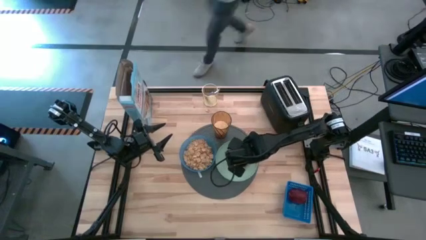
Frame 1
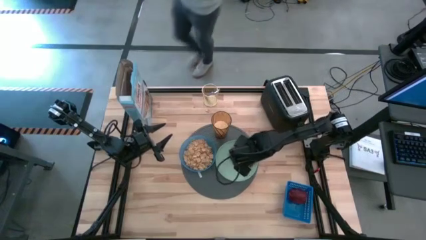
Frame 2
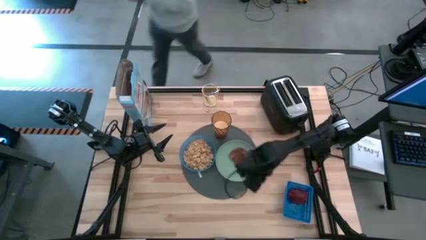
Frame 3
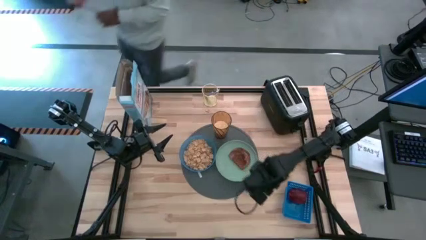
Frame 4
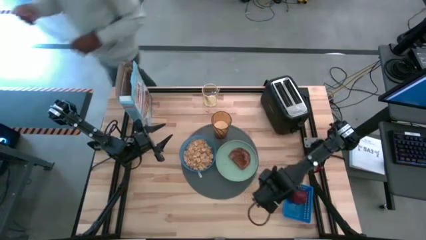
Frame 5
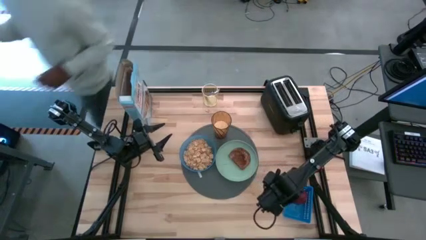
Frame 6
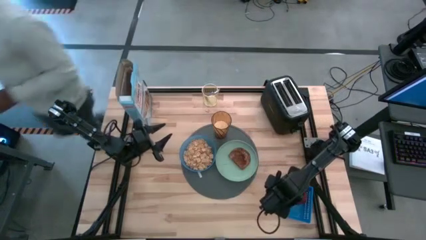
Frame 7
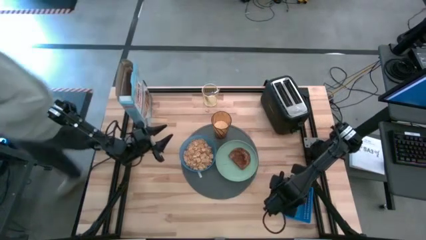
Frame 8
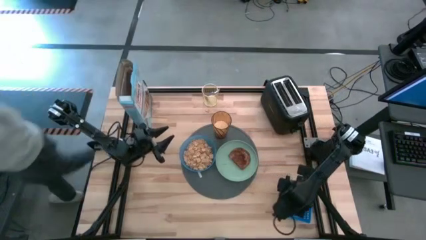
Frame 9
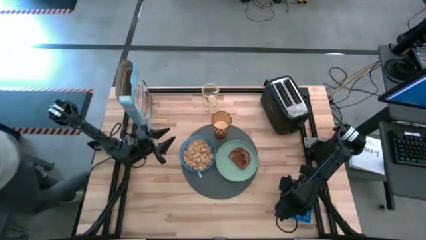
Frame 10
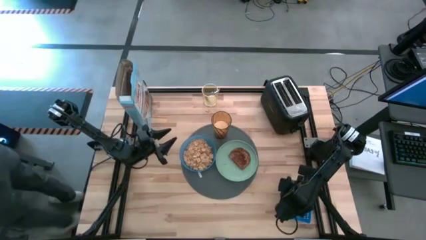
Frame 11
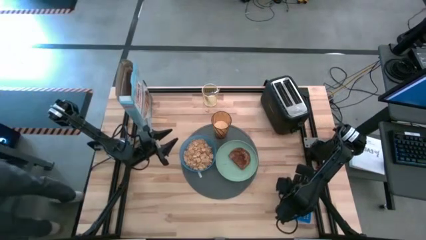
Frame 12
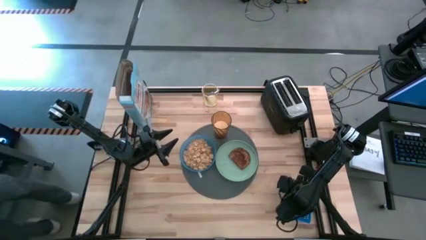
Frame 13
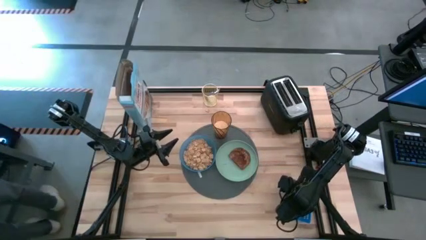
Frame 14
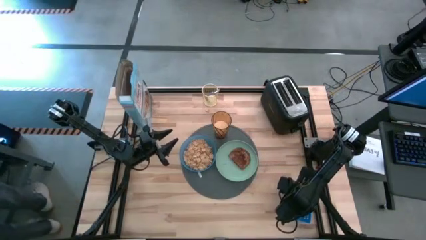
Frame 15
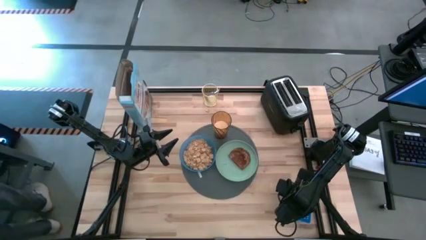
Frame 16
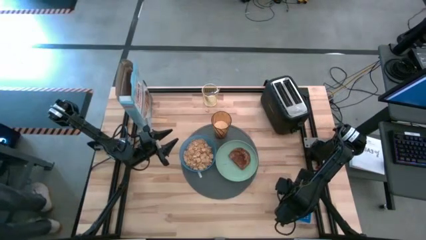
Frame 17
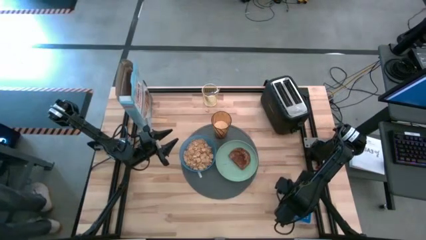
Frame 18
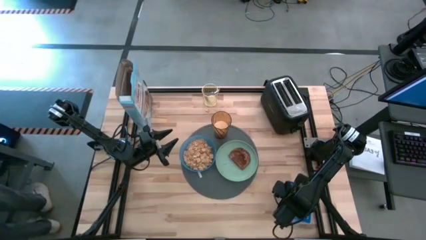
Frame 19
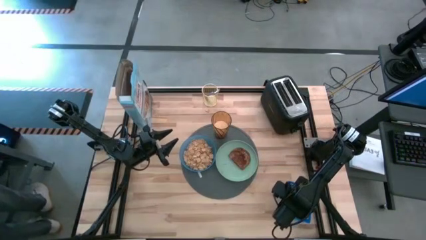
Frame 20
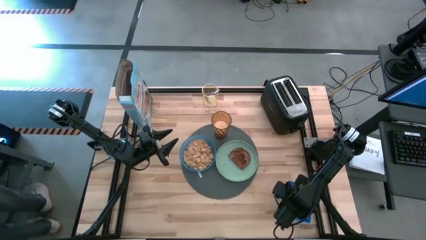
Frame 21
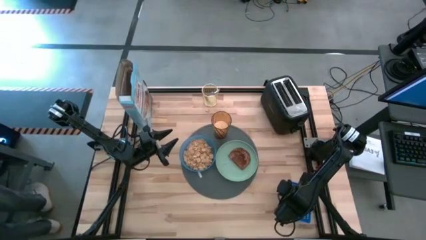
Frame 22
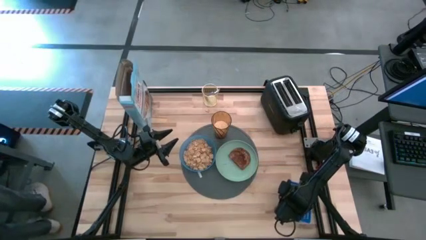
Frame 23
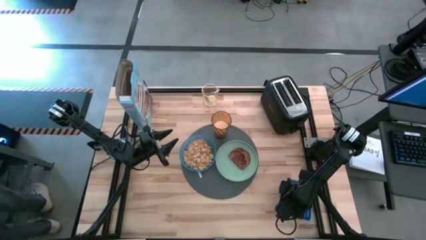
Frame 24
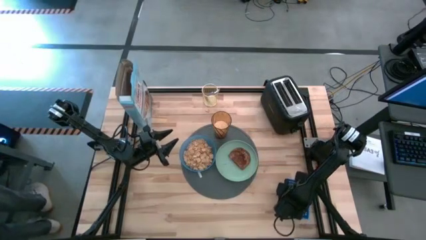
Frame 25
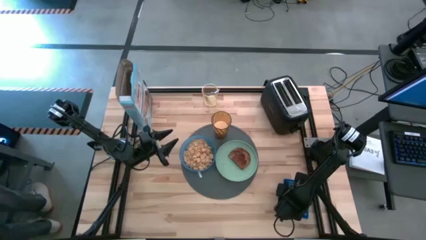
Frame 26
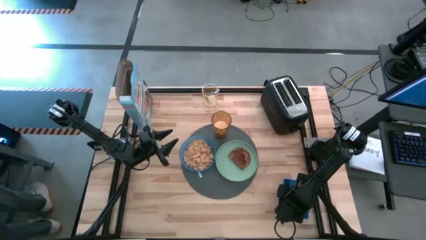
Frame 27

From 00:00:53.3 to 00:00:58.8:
Task: Arrange a breakfast setting
Put the apple on the green plate

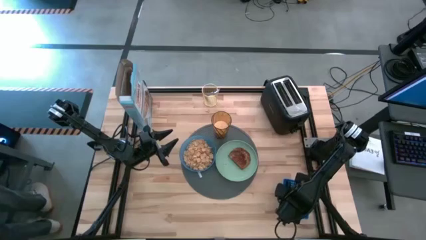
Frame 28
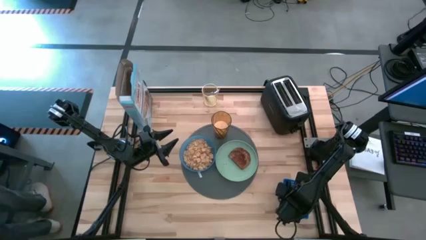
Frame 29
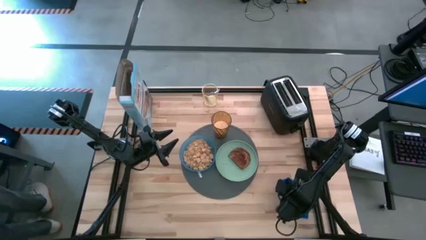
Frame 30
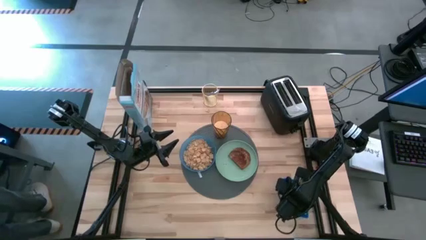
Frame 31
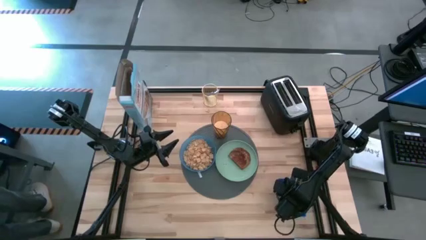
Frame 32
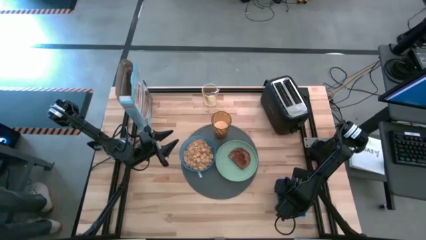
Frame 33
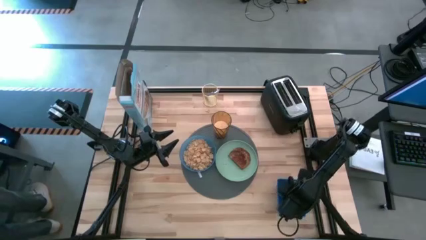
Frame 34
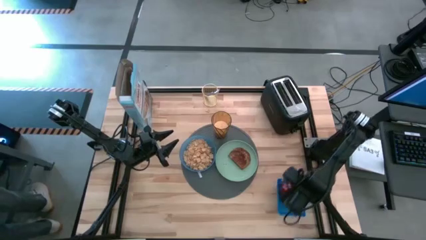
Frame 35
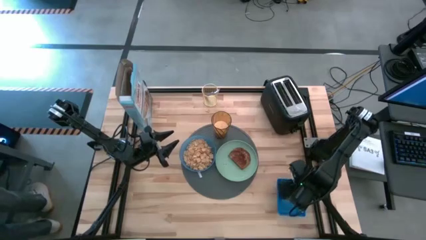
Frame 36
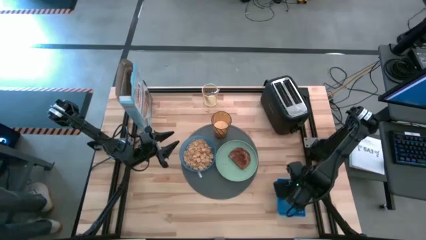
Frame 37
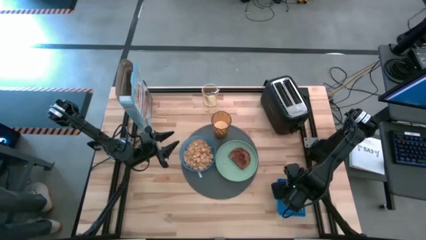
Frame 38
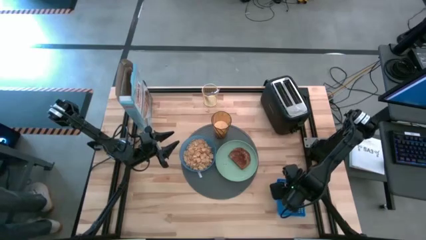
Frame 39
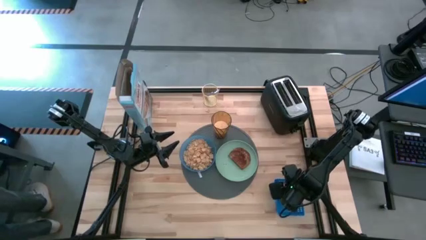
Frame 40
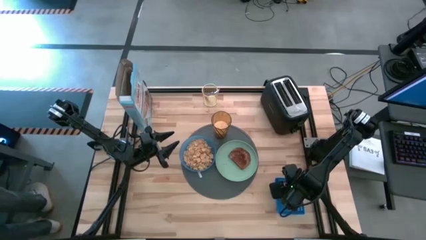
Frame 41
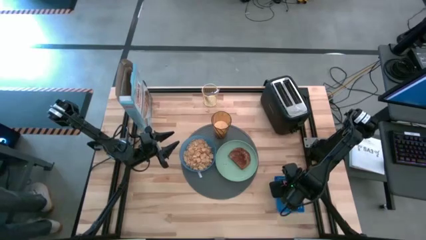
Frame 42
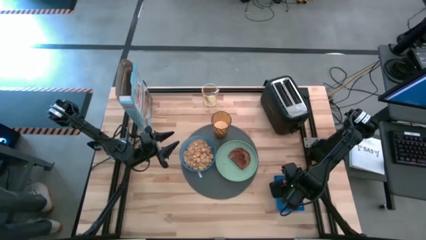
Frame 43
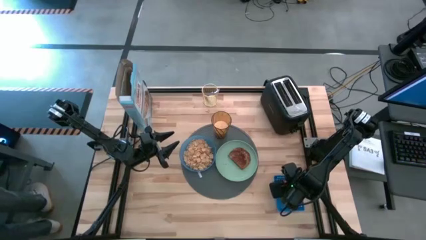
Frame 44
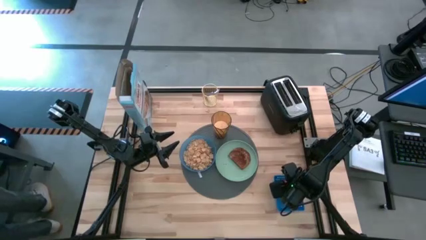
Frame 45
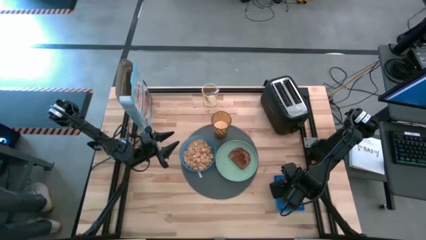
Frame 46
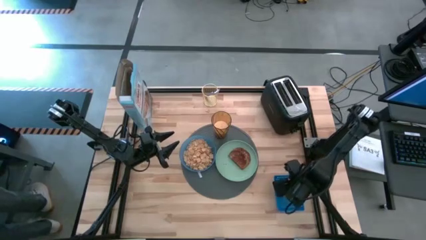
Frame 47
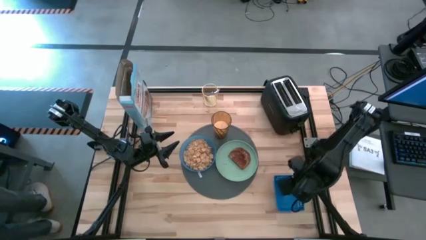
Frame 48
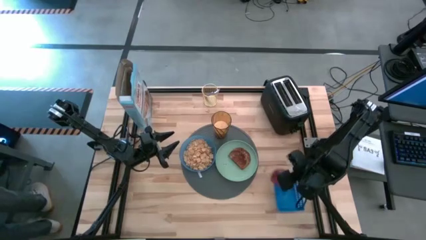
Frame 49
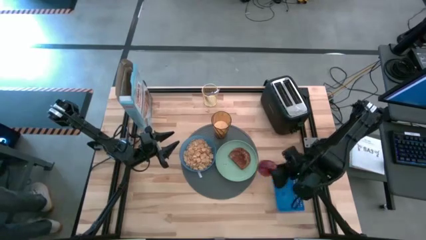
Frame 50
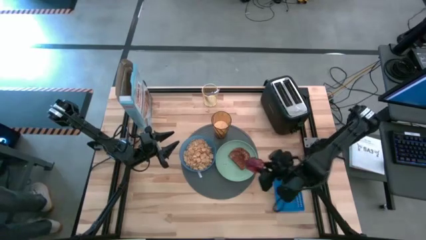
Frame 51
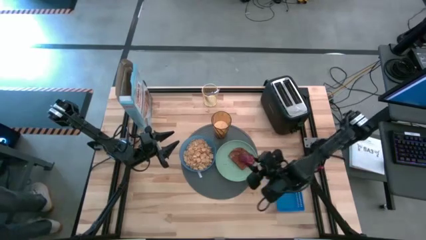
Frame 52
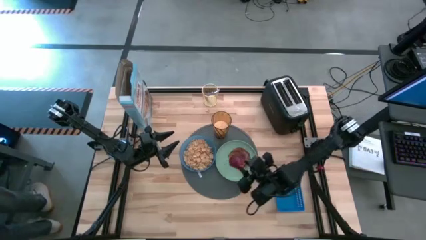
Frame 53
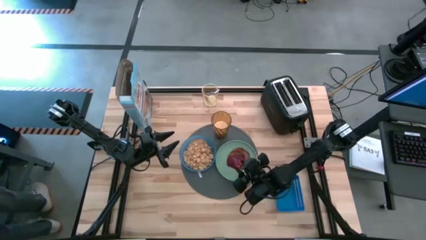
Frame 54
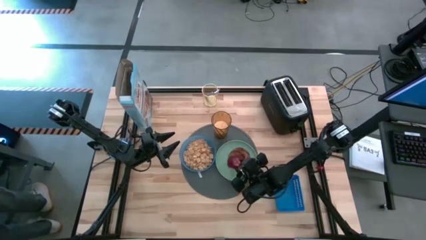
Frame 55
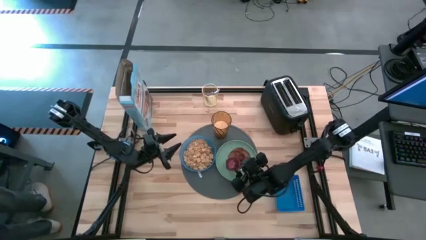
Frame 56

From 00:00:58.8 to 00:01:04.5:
Put the apple on the green plate

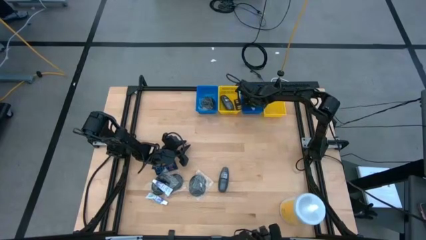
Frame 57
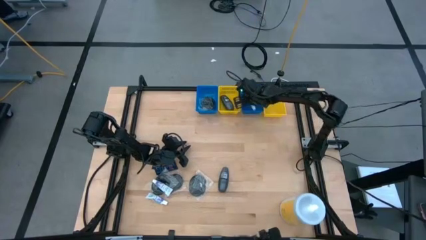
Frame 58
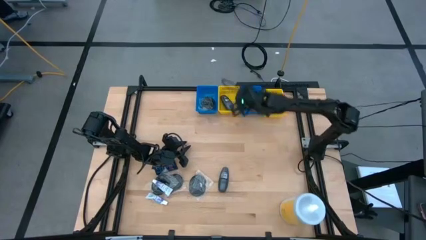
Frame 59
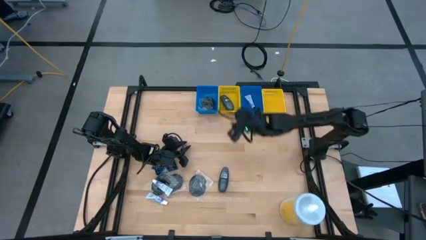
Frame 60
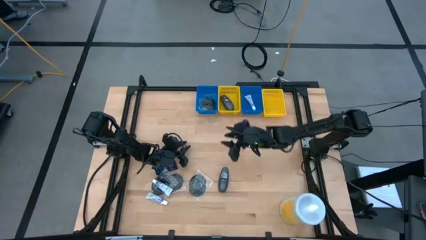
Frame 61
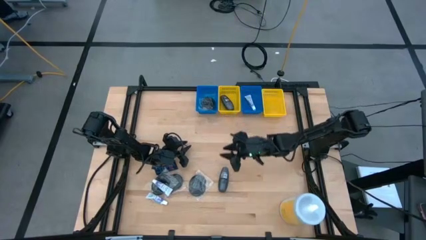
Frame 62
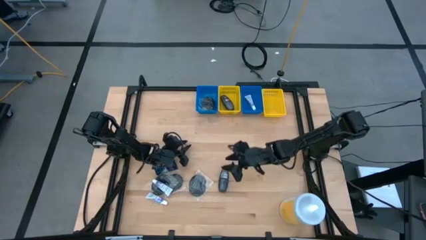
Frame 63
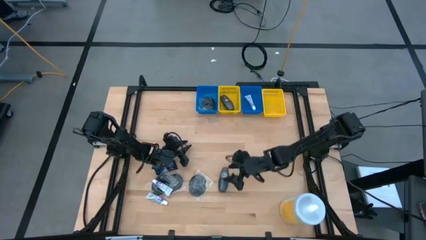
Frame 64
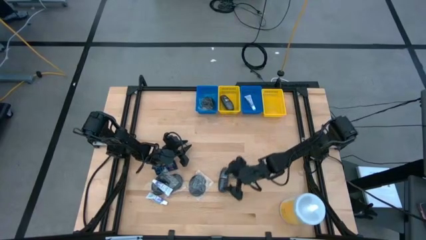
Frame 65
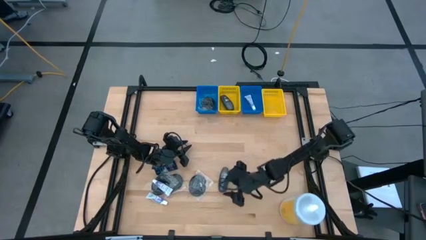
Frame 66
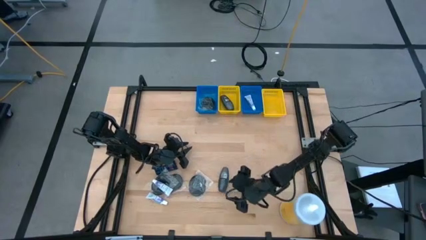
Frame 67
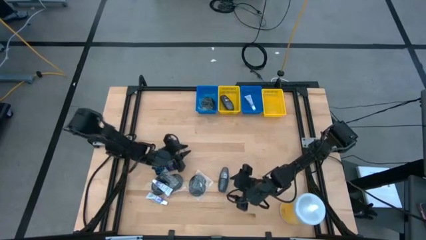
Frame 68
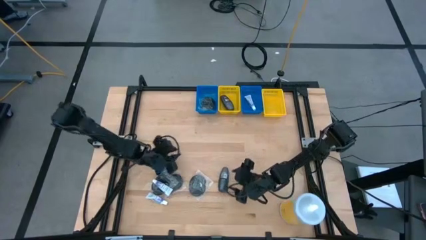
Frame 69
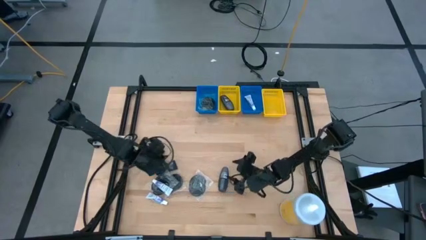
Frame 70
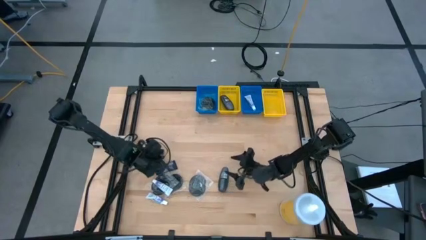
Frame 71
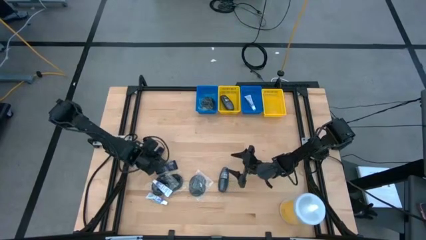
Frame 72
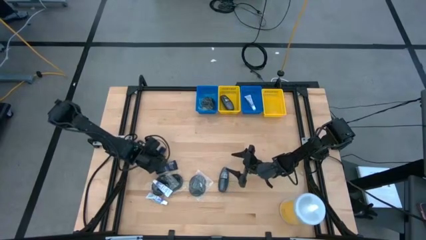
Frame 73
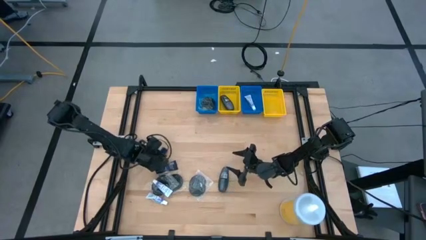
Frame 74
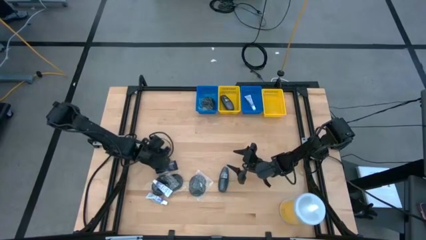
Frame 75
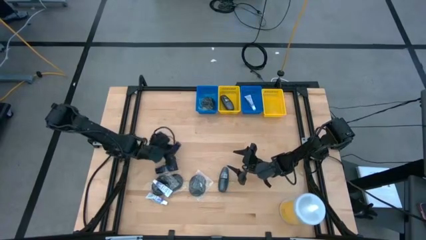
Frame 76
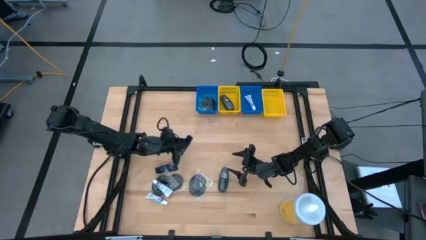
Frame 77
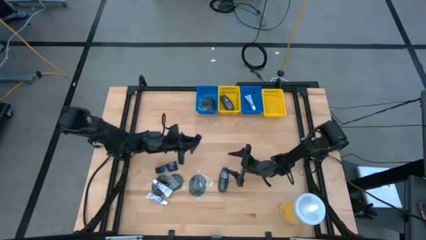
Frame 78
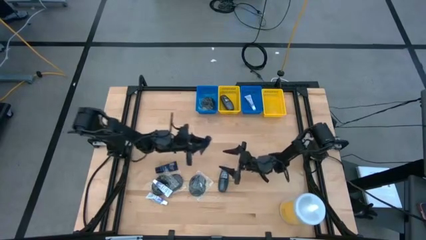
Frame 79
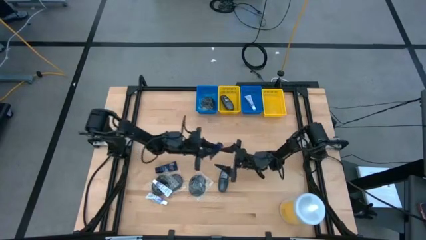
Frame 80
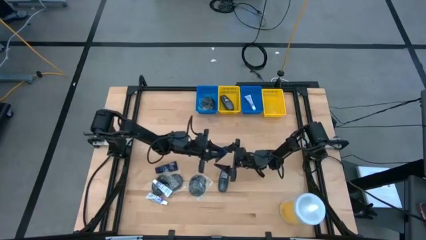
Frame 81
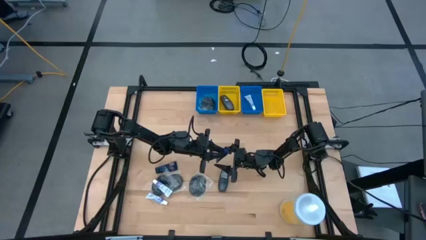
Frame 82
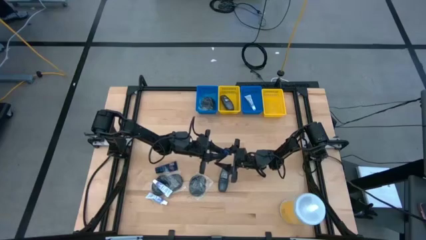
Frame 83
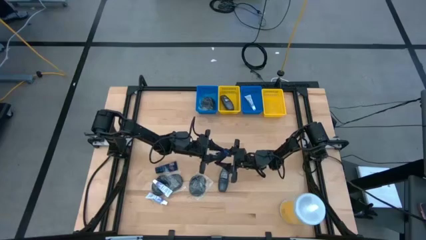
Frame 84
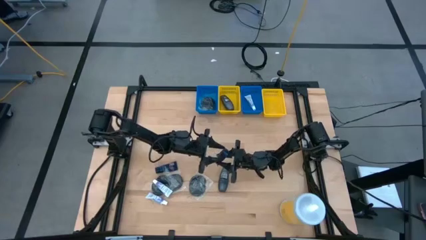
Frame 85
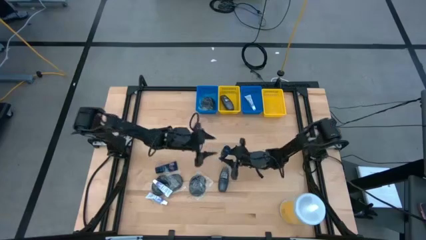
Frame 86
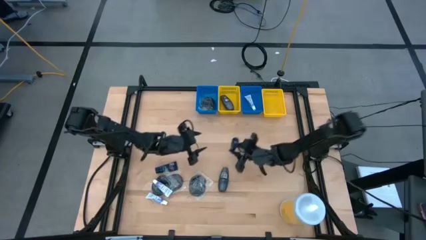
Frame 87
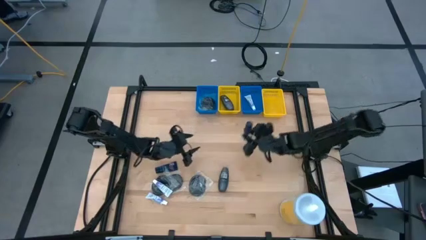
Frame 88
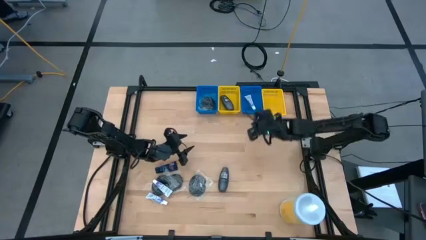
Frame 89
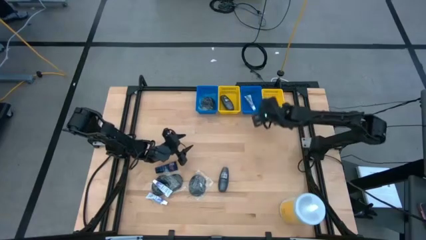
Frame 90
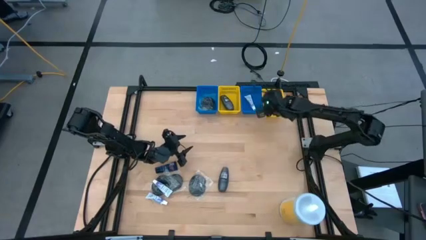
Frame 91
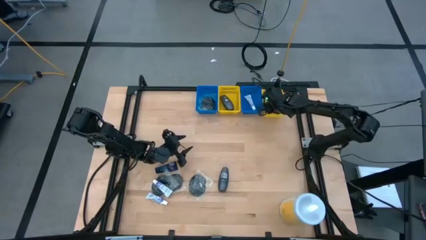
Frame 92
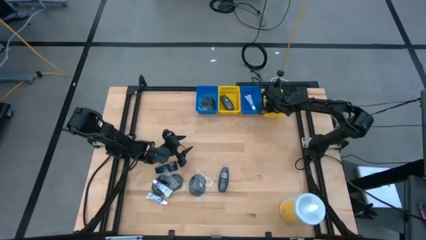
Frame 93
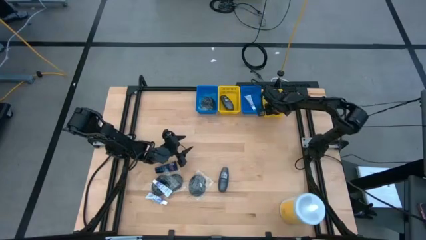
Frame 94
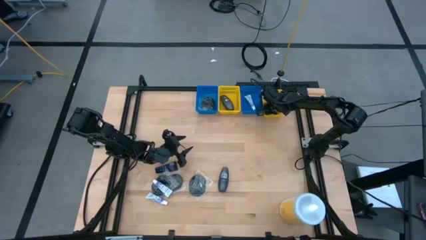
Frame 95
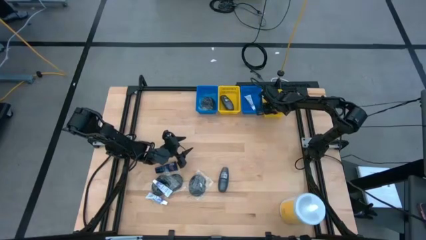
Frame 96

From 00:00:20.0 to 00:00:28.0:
Task: Pick & Place Travel size toiletries
Put the blue shave cream into the right yellow bin
